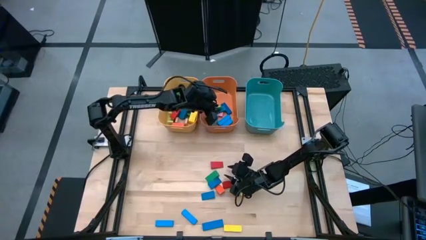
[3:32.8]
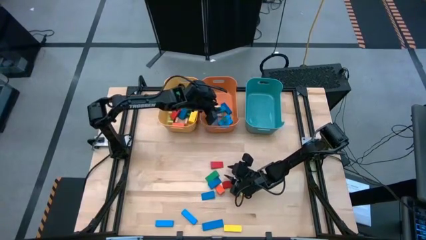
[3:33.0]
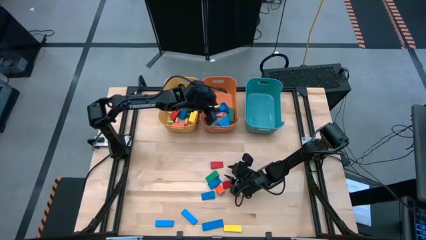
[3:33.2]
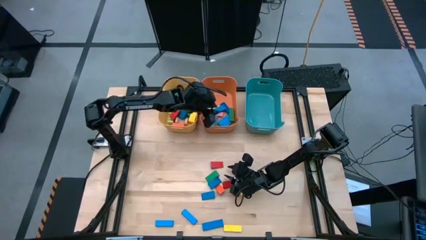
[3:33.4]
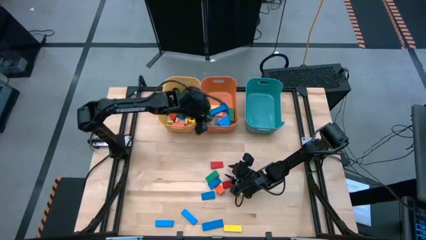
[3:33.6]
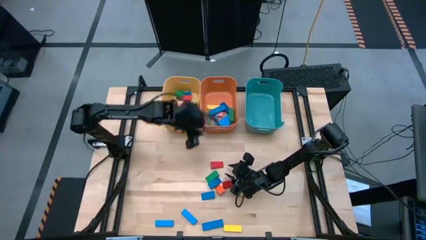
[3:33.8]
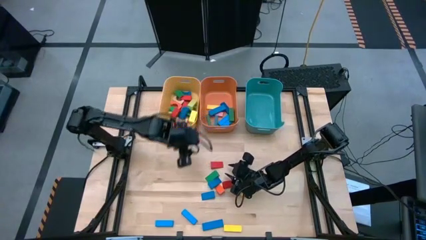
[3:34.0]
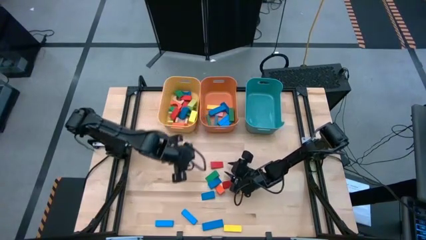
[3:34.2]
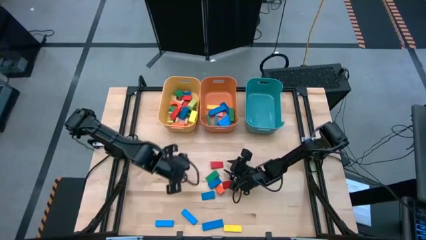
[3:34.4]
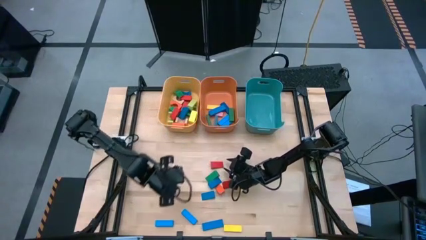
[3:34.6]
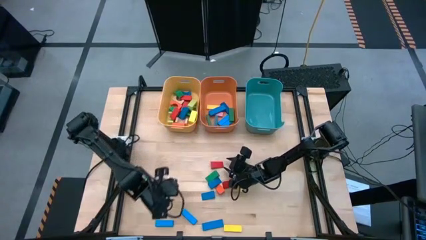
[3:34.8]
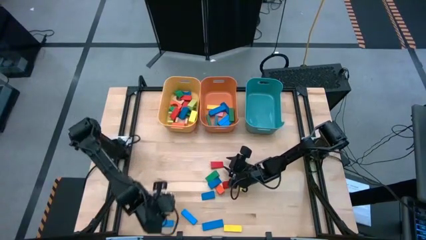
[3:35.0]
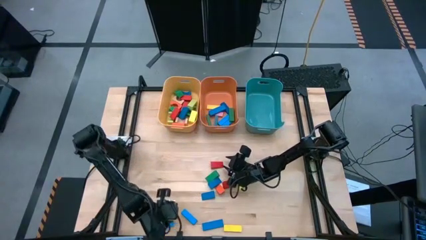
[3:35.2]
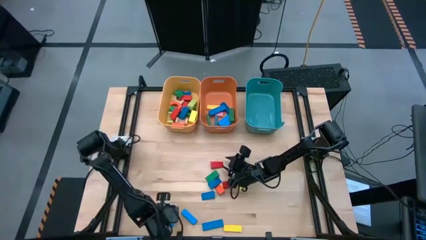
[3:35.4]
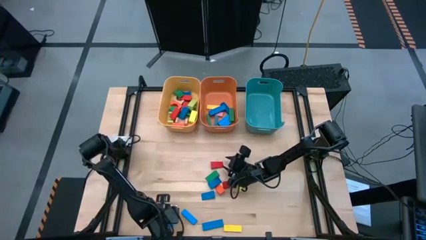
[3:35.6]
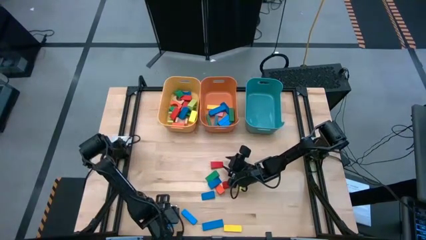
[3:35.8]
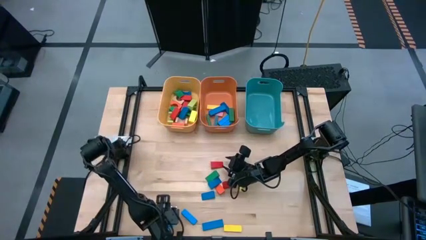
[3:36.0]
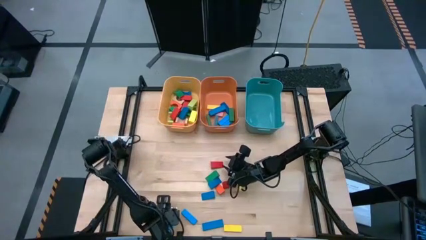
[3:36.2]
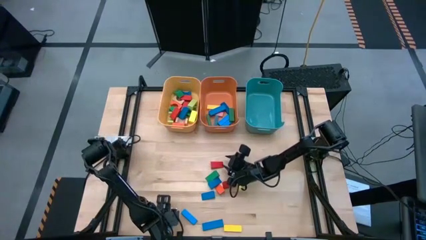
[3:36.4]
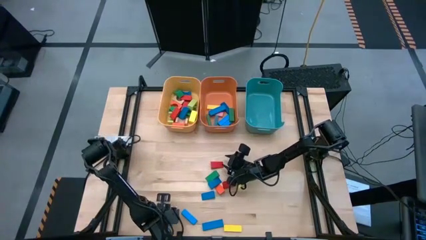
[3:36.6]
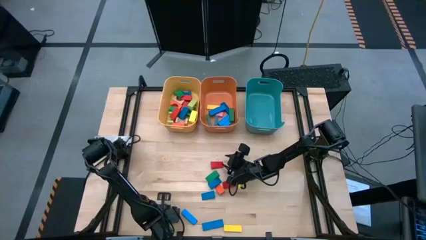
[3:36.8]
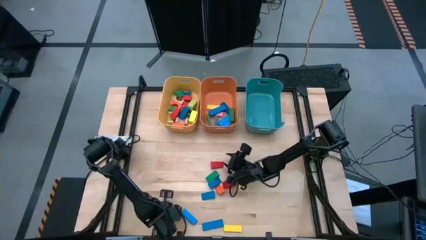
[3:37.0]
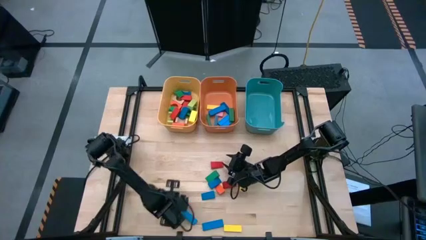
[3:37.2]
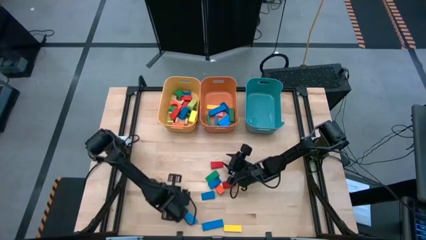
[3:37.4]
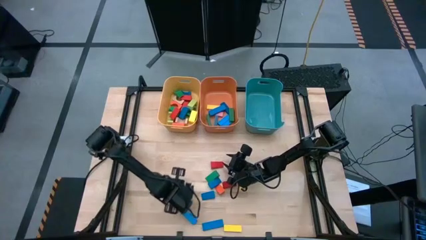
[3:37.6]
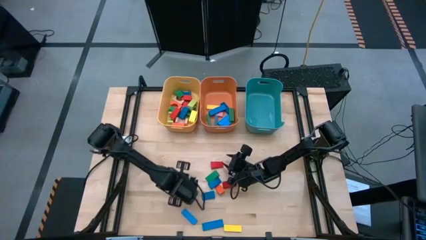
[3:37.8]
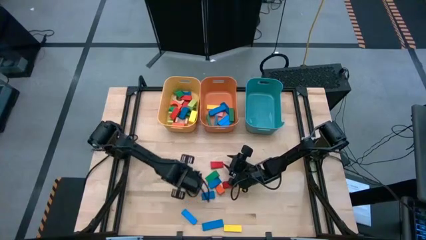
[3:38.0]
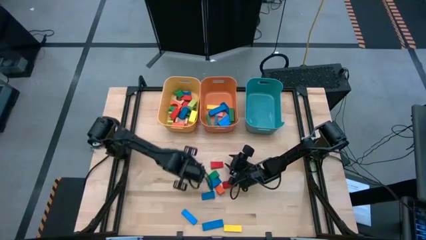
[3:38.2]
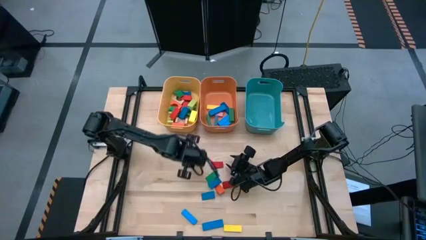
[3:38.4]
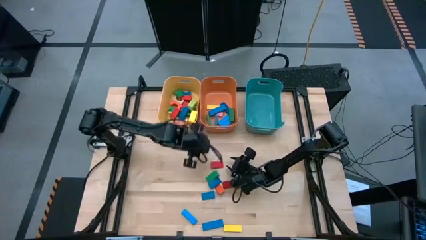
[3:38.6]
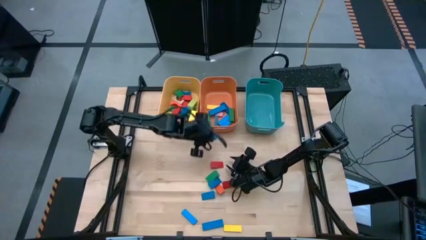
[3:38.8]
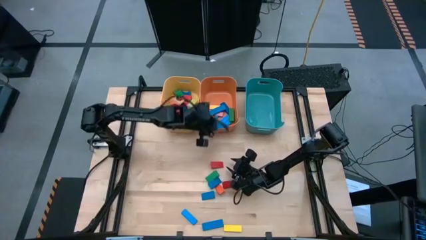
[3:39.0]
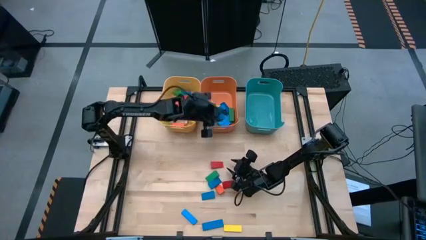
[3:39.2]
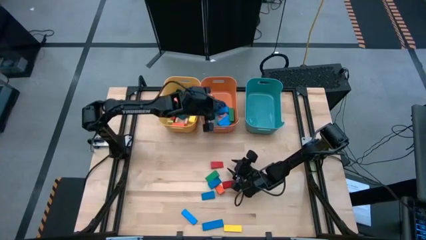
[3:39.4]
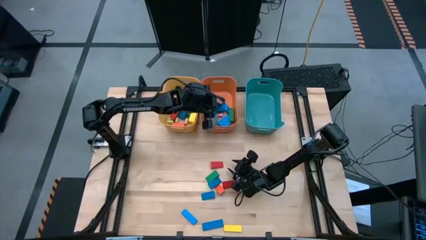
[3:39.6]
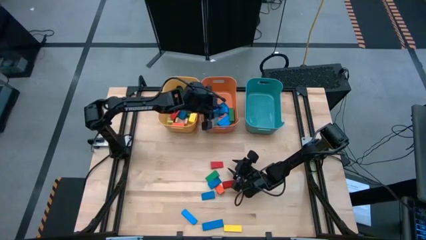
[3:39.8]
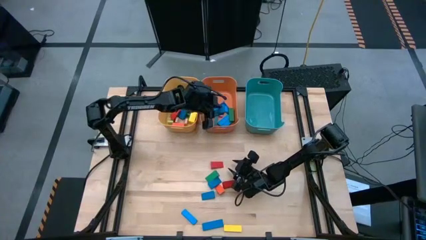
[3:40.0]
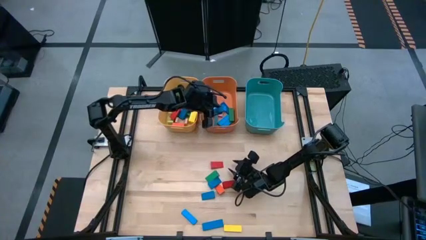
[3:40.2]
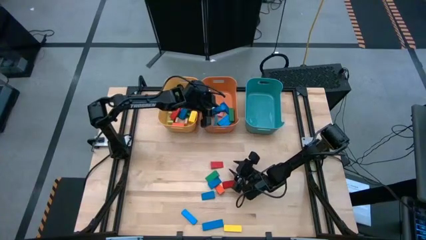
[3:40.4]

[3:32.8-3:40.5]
Task: Sort blocks by size
Put the blue rectangle block into the orange bin

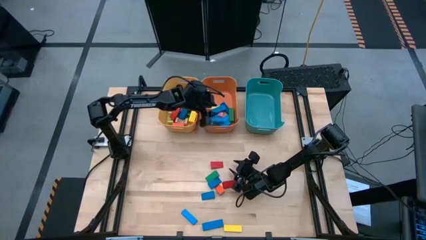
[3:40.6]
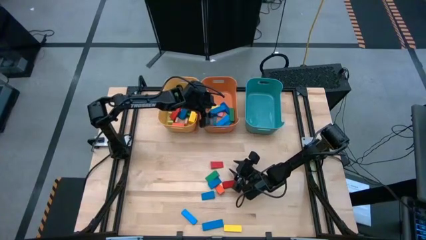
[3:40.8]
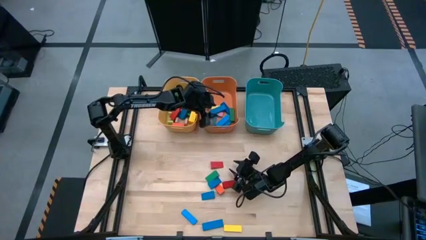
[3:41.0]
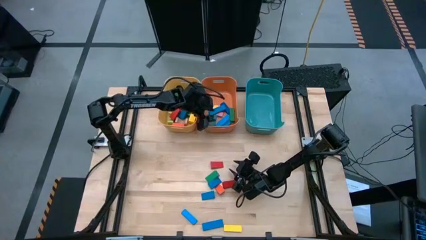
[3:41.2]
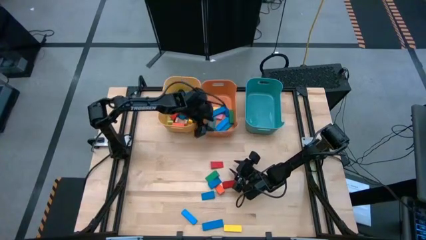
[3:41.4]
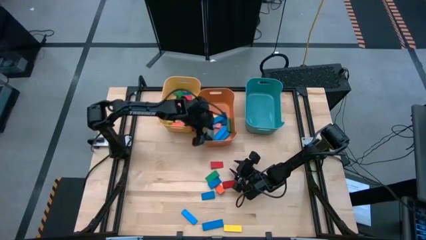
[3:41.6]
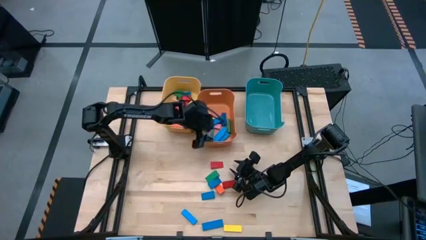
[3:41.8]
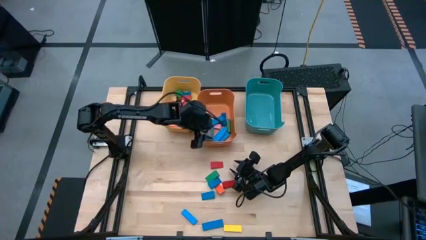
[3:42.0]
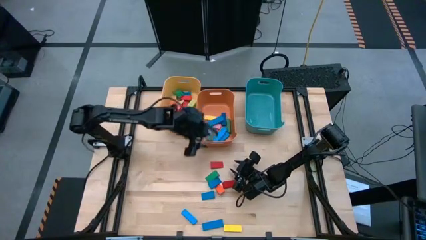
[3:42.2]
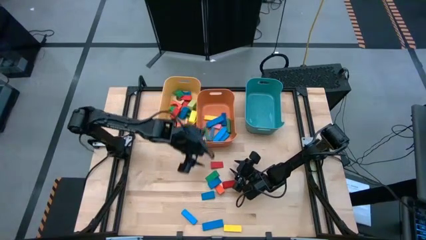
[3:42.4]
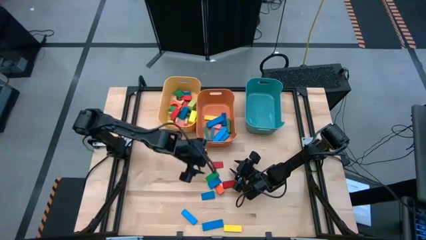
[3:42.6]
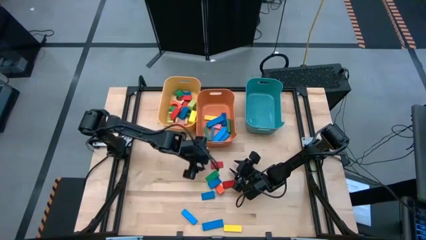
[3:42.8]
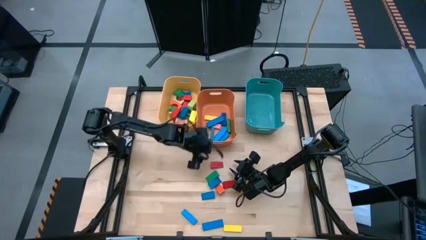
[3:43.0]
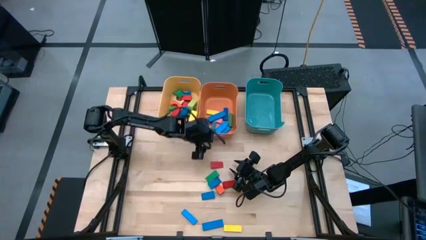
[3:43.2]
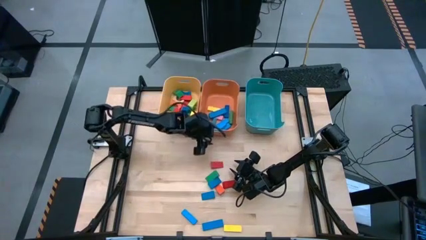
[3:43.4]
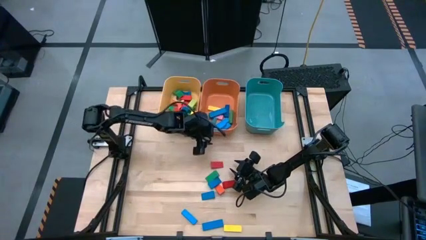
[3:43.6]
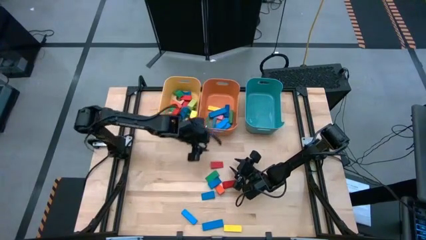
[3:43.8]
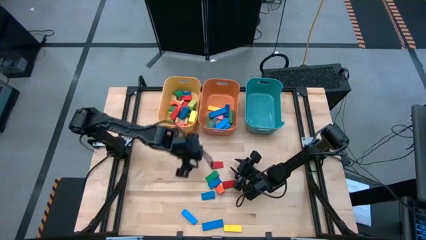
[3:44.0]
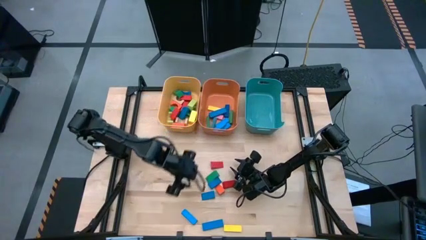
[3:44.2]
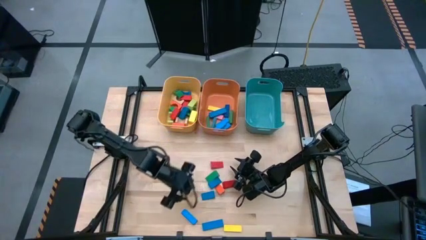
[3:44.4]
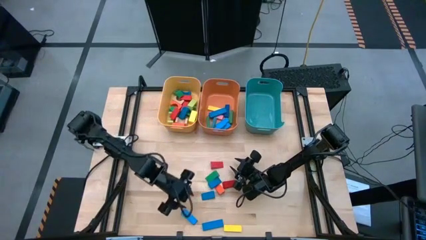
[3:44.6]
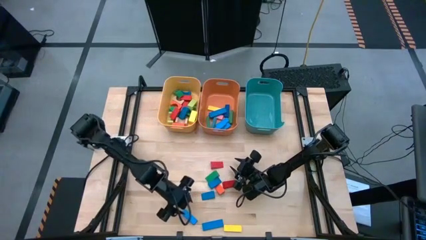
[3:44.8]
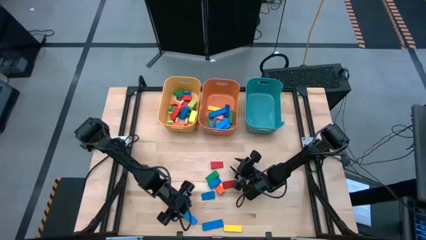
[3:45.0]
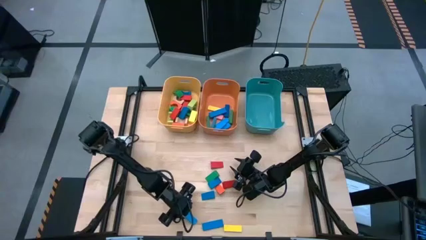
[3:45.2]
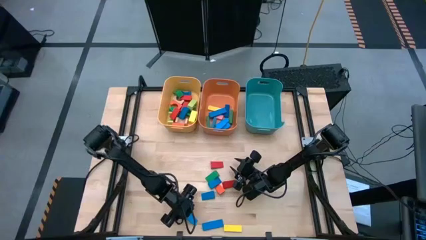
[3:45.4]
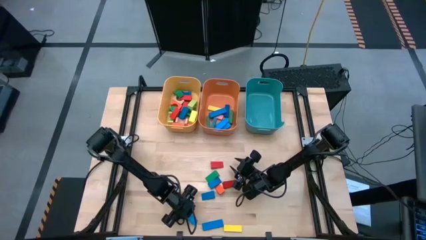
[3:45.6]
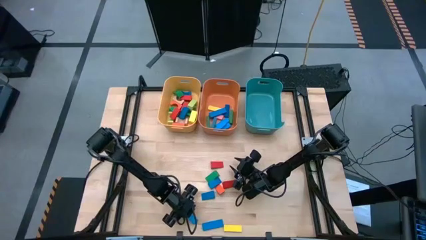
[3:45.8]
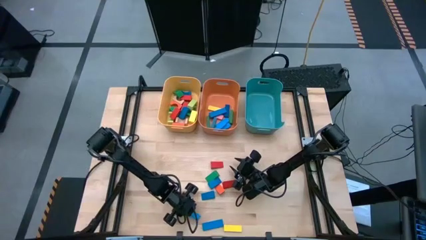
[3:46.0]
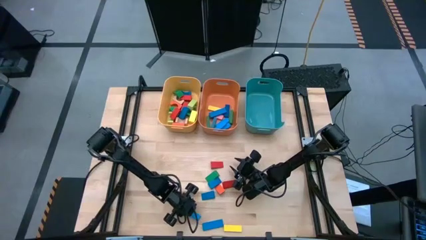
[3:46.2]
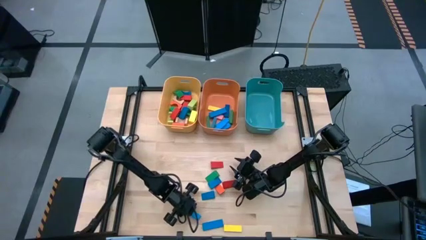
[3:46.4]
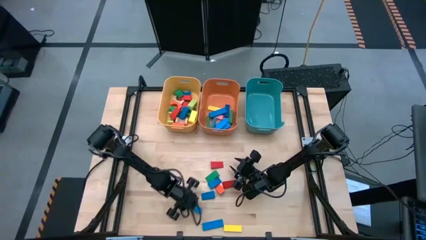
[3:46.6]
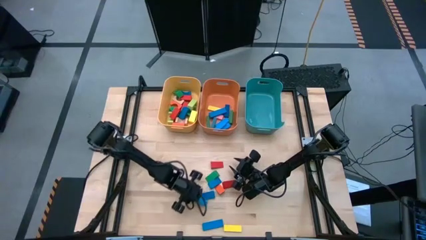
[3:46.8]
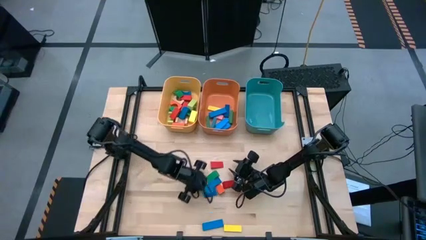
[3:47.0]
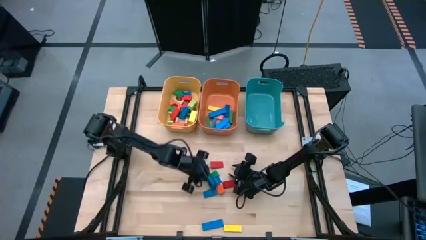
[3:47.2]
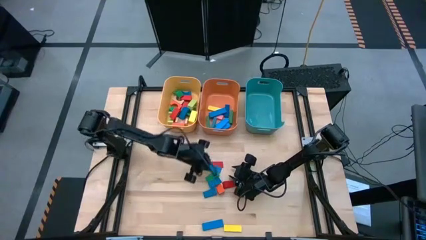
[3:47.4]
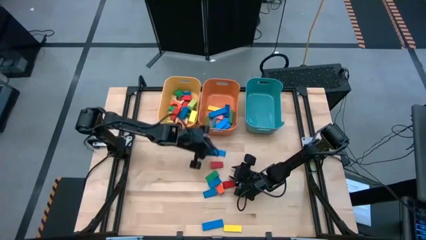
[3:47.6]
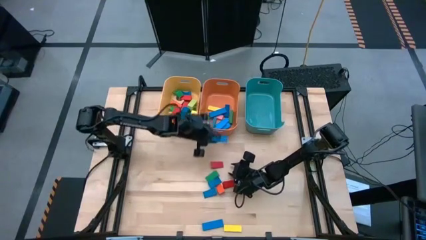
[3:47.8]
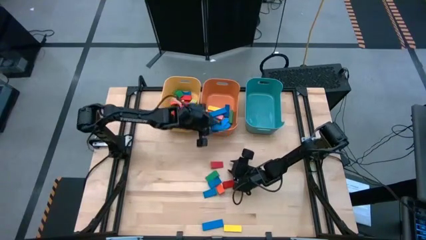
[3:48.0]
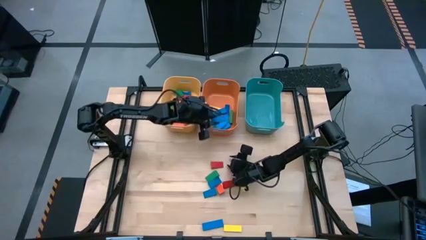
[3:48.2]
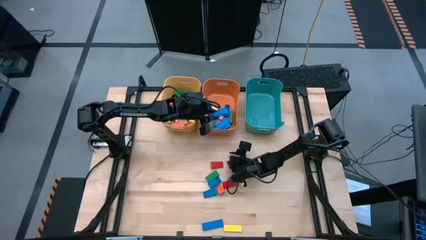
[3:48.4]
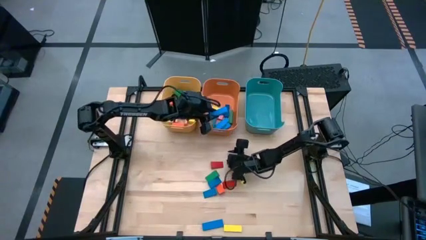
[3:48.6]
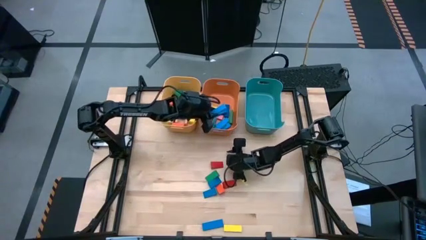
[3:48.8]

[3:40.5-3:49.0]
Put the blue rectangle block into the orange bin
